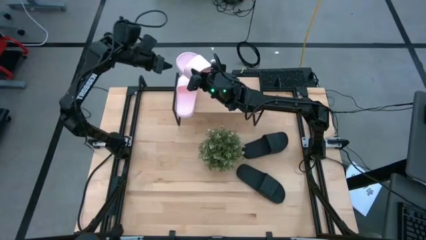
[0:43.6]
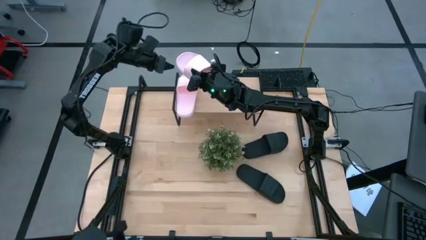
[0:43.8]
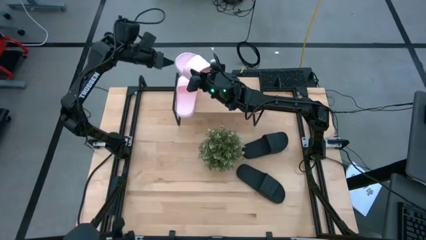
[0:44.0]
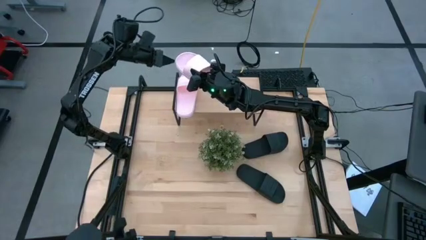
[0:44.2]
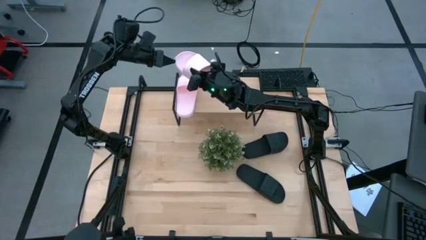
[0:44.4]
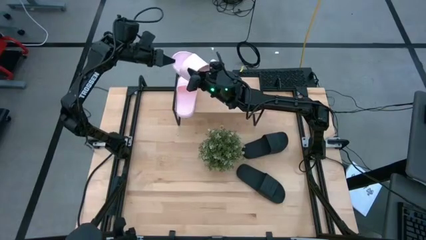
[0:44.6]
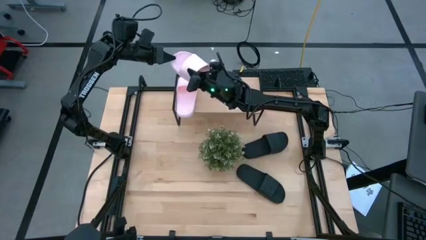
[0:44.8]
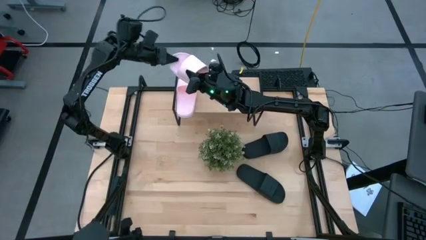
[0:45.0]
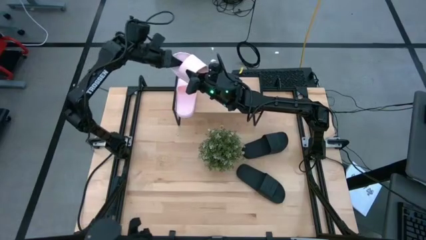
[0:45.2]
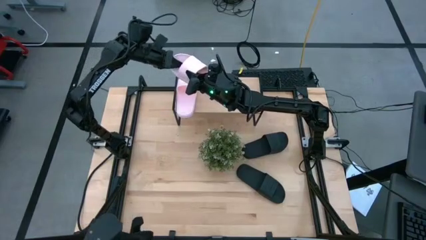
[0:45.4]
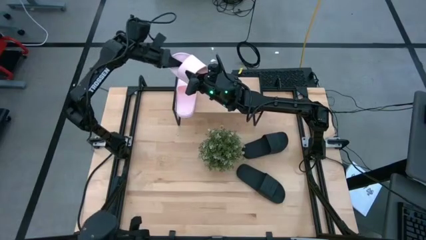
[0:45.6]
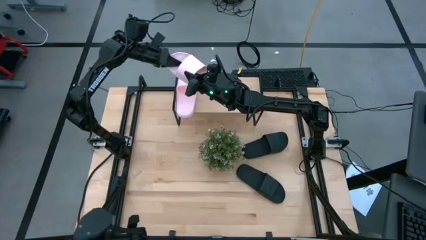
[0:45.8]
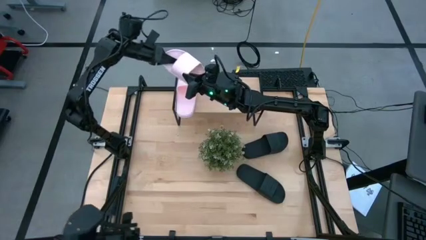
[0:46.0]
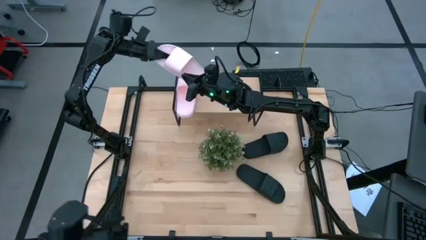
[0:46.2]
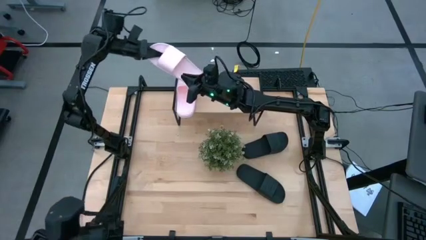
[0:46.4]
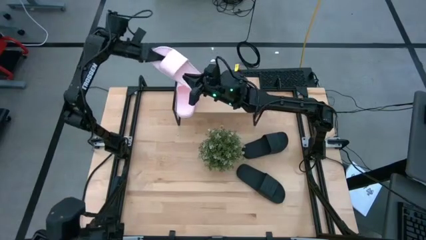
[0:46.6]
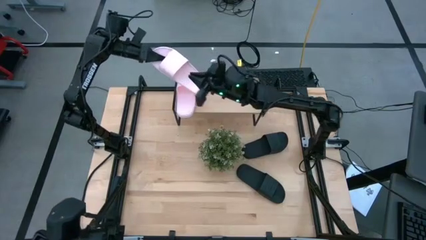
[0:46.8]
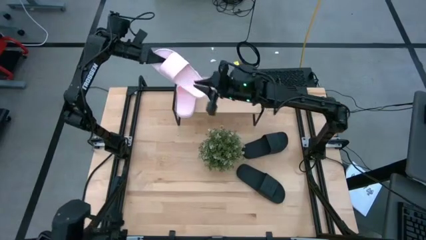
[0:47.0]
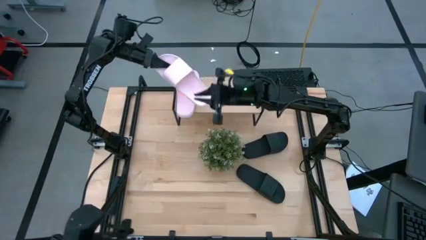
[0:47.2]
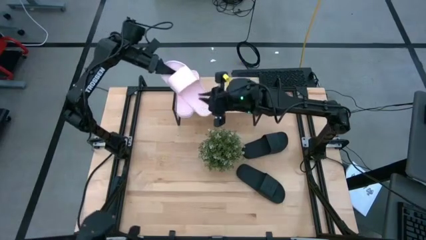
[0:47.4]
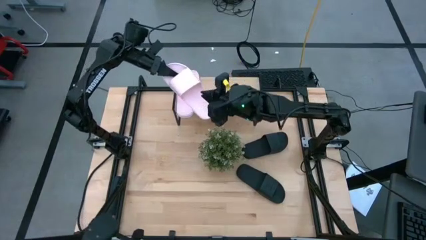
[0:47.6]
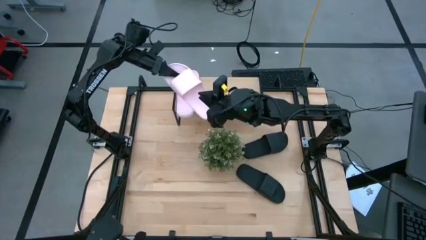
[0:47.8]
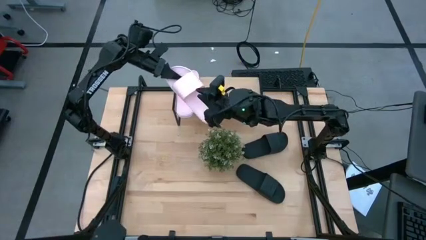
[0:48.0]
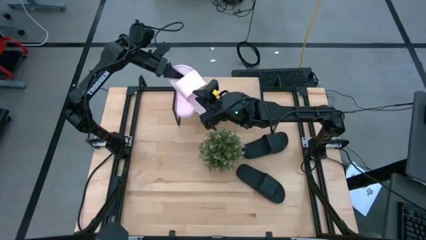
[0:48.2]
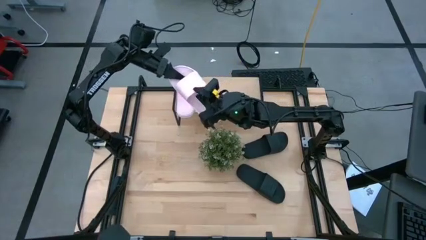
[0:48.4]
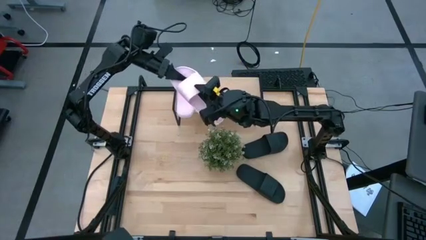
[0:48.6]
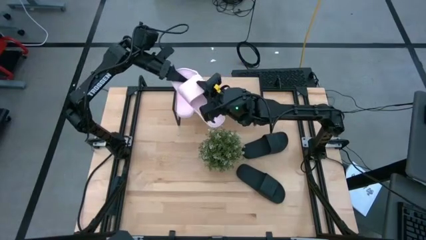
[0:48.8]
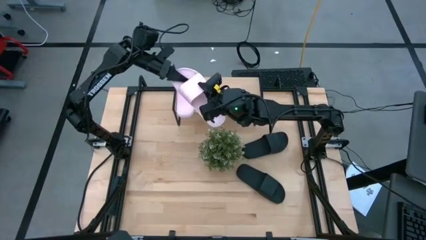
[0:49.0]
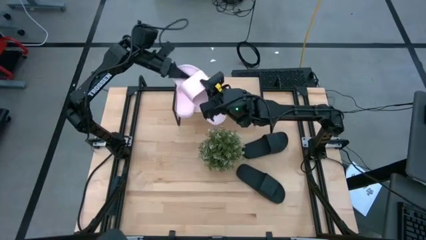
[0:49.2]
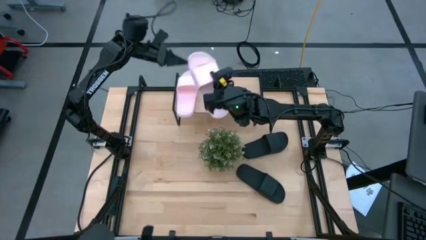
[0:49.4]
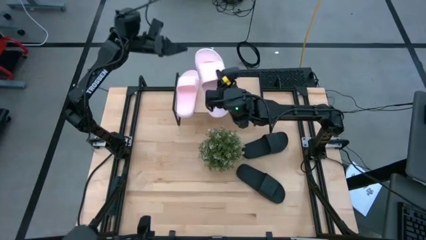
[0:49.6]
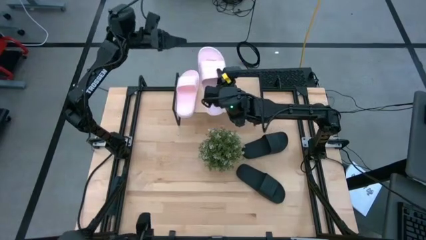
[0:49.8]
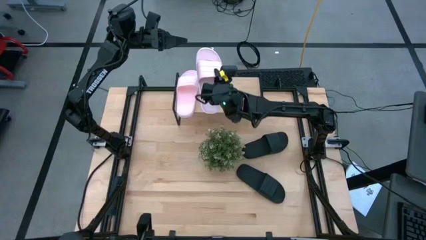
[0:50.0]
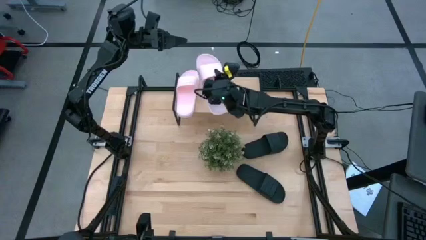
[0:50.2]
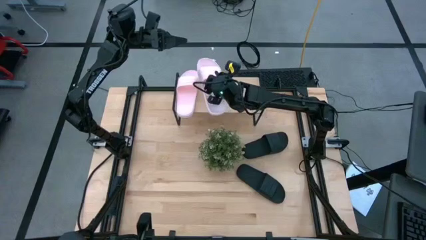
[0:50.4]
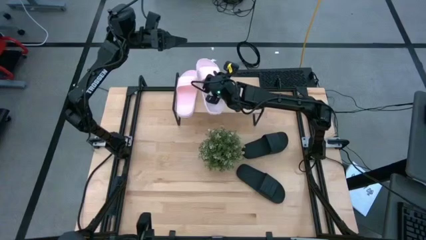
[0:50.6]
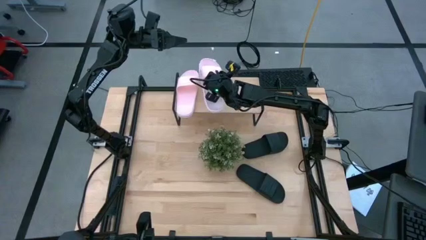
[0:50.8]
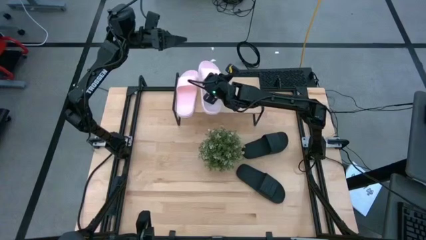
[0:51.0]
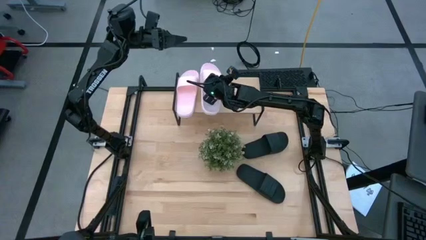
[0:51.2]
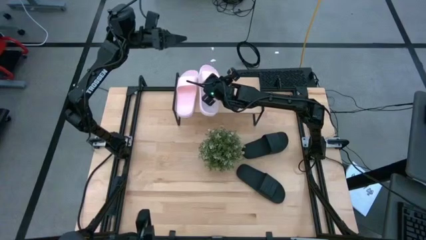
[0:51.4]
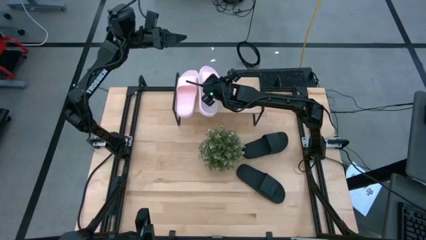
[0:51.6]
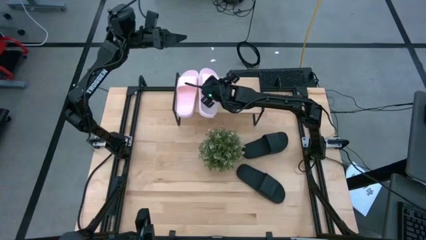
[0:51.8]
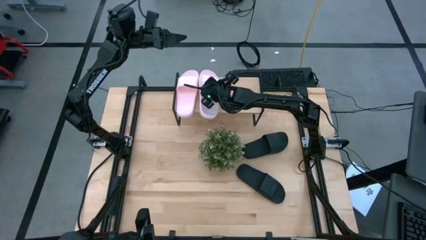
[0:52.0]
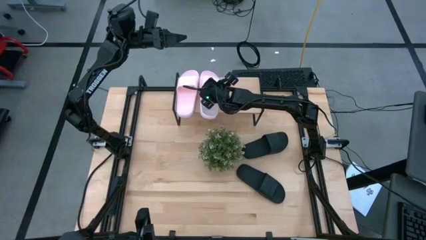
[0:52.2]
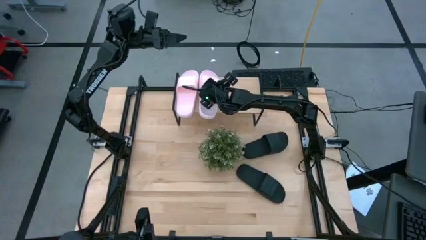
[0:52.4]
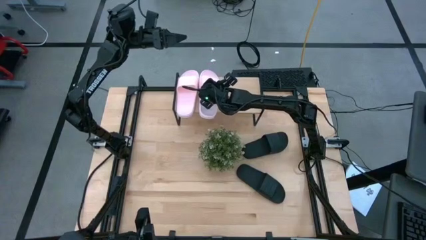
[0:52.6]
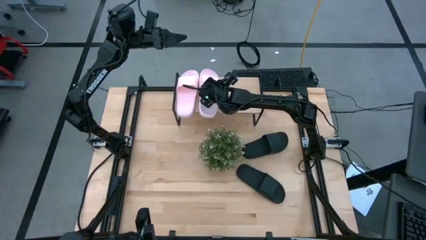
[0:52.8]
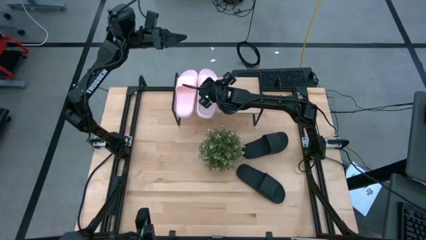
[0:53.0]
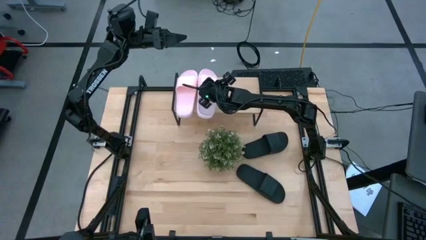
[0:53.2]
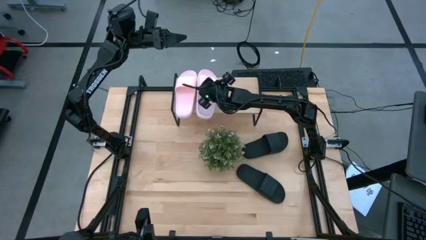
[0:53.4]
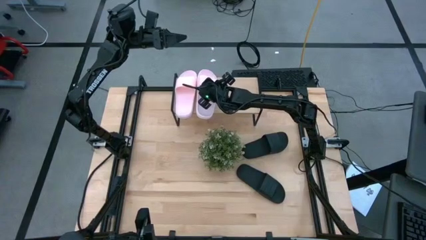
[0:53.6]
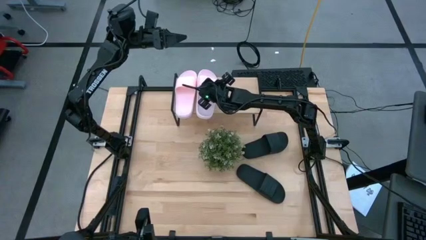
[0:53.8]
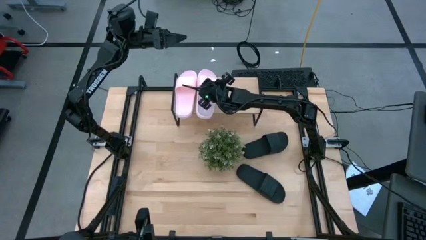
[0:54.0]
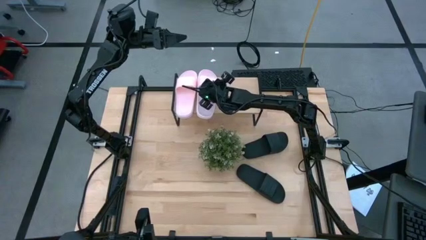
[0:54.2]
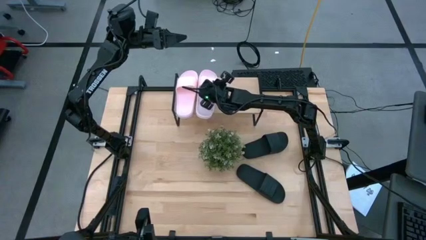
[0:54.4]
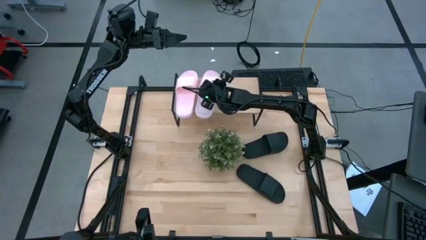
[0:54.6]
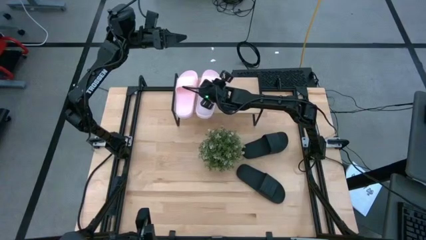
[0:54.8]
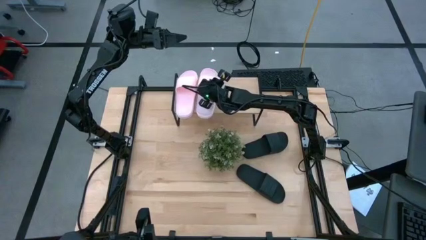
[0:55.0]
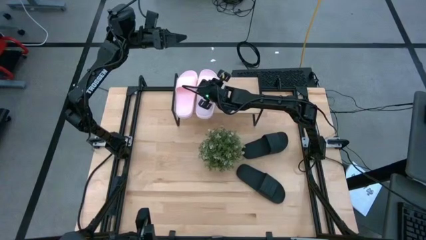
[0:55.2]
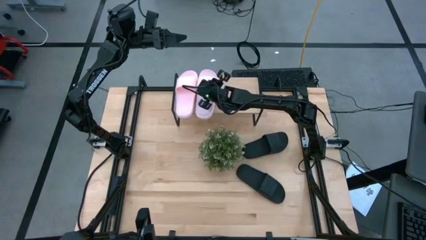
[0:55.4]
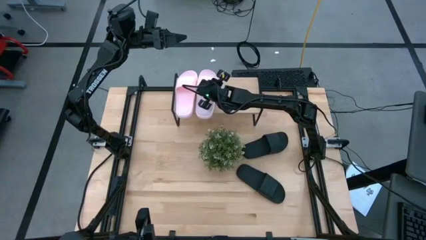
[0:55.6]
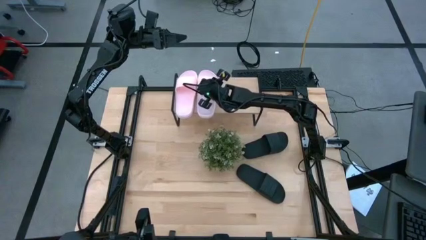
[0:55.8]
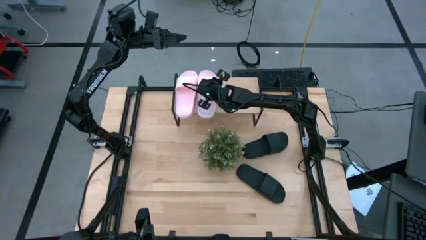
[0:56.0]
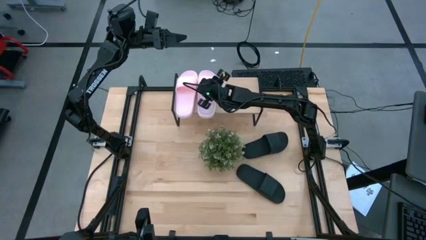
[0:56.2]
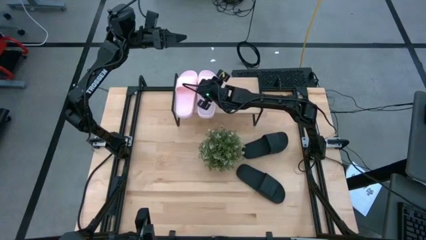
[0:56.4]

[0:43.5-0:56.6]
Task: Pick and place slides into the shelf
Put the pink slipper on the shelf
